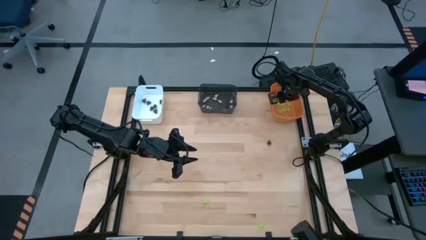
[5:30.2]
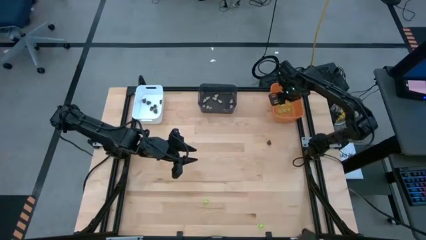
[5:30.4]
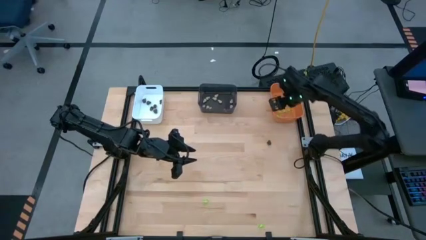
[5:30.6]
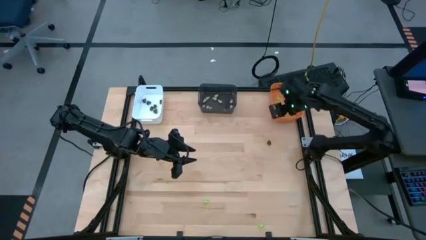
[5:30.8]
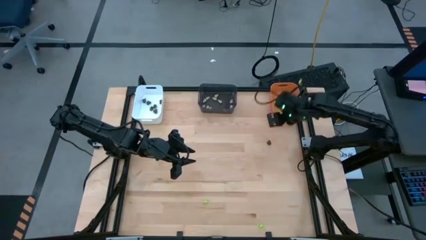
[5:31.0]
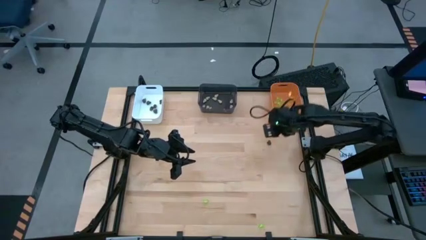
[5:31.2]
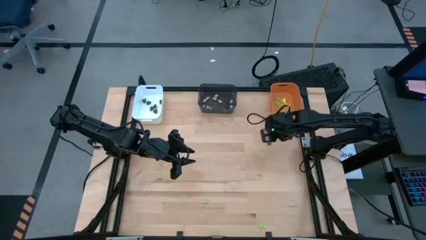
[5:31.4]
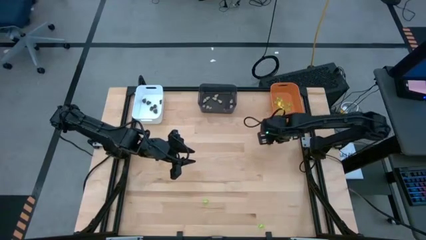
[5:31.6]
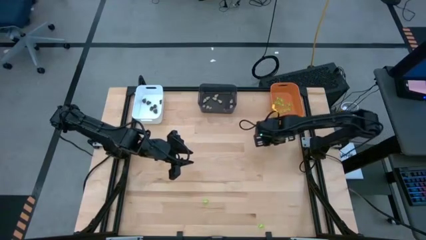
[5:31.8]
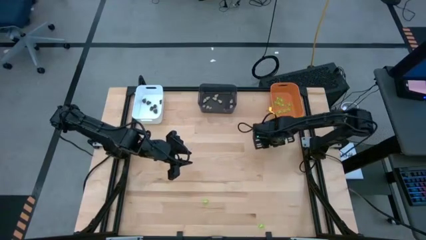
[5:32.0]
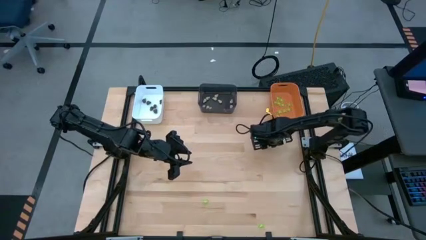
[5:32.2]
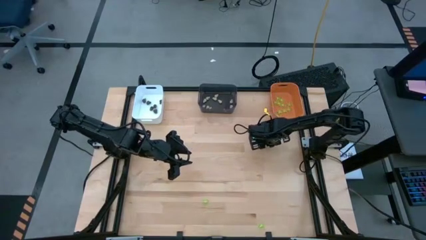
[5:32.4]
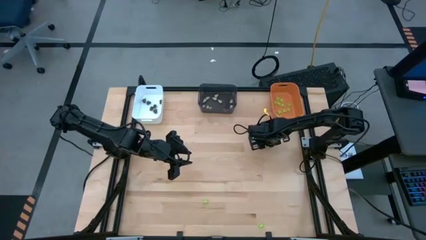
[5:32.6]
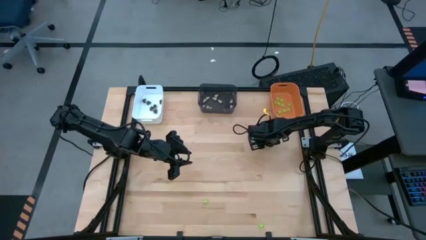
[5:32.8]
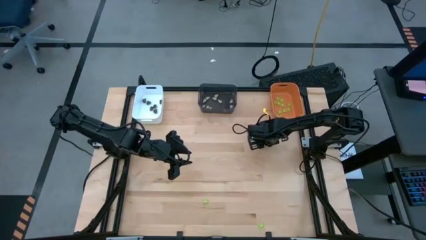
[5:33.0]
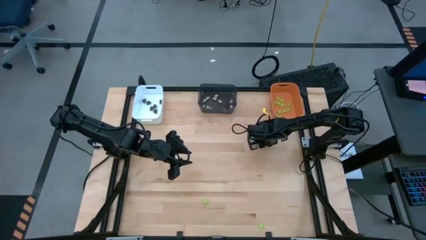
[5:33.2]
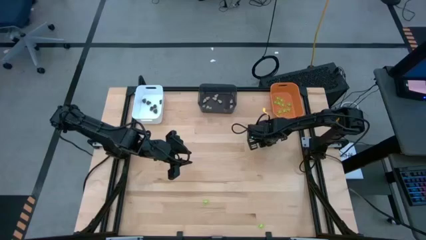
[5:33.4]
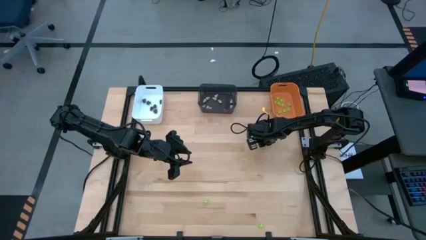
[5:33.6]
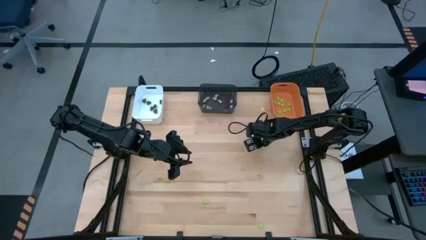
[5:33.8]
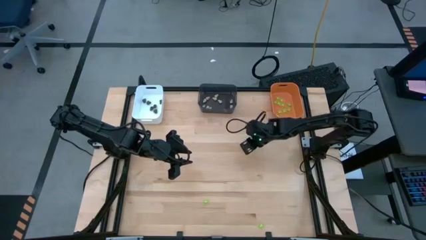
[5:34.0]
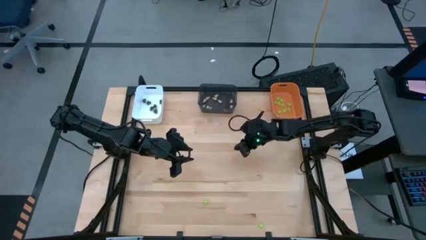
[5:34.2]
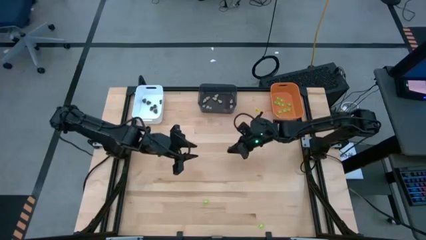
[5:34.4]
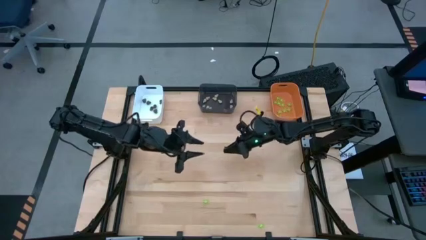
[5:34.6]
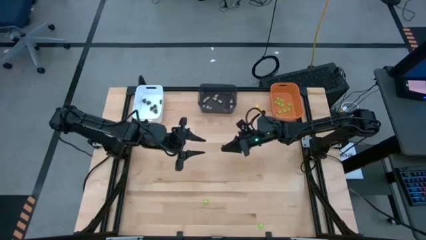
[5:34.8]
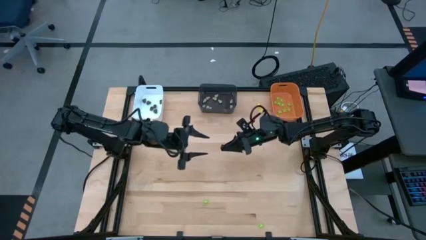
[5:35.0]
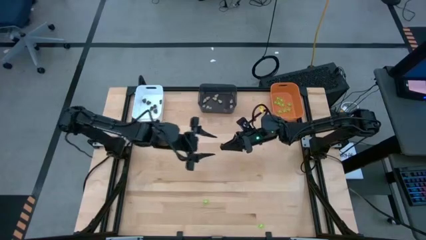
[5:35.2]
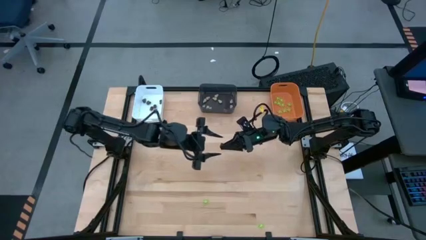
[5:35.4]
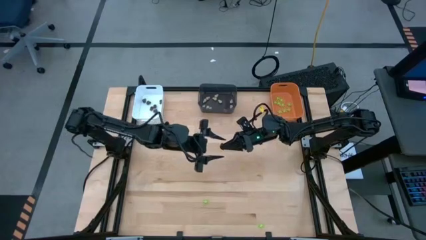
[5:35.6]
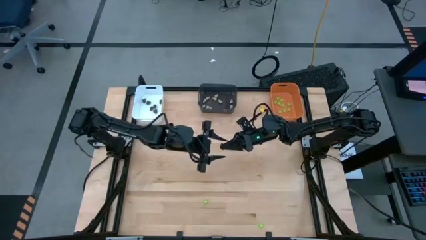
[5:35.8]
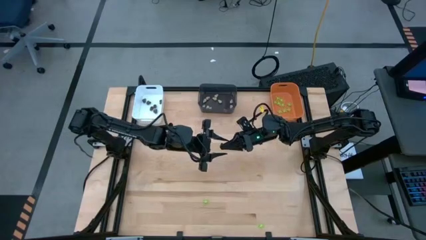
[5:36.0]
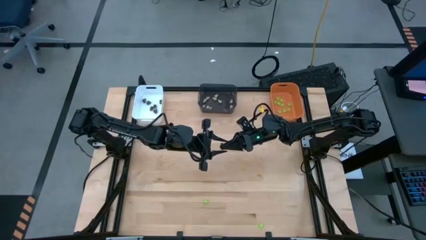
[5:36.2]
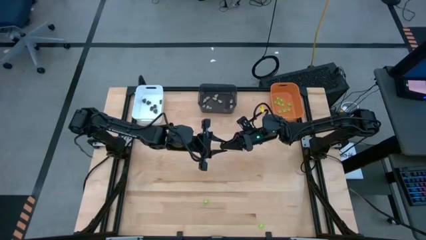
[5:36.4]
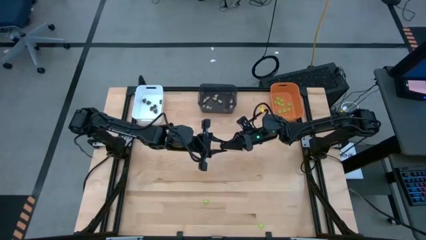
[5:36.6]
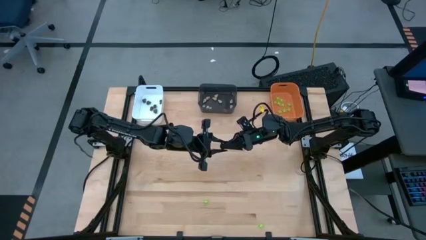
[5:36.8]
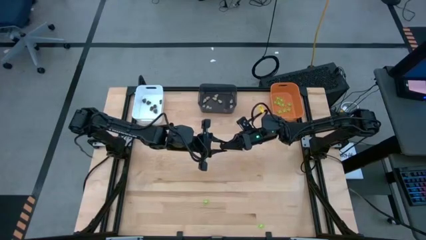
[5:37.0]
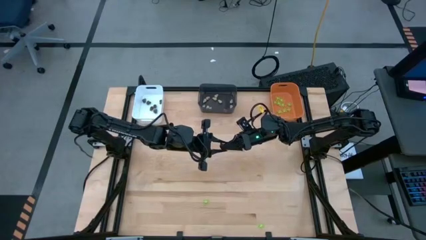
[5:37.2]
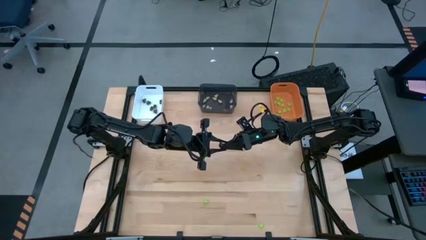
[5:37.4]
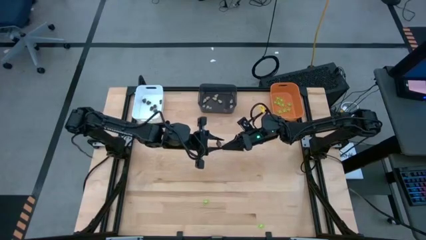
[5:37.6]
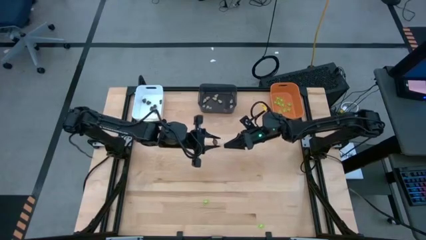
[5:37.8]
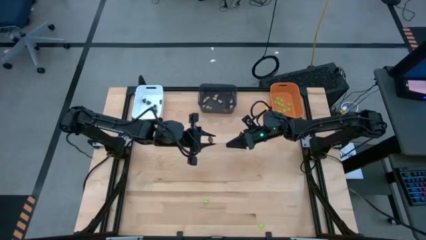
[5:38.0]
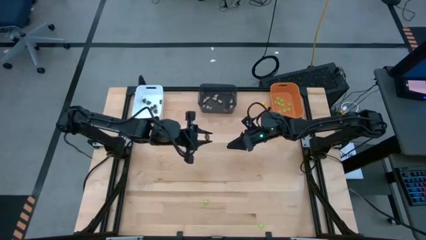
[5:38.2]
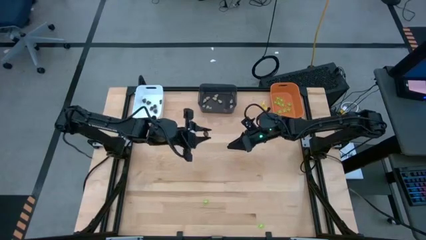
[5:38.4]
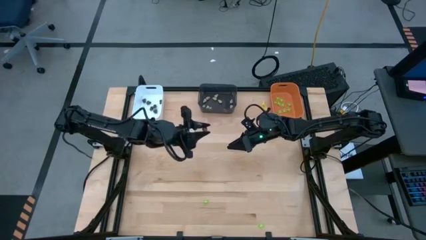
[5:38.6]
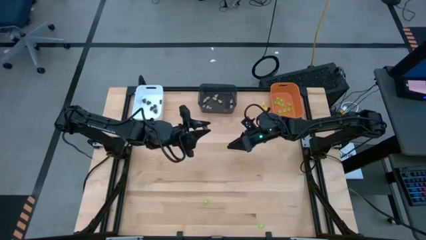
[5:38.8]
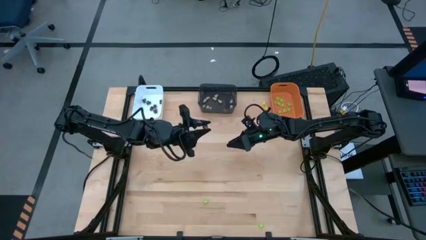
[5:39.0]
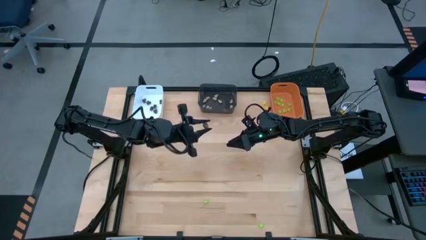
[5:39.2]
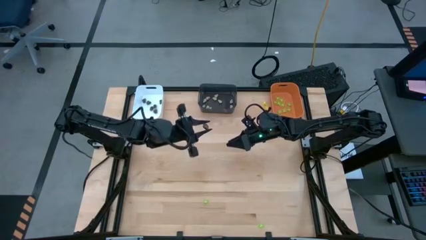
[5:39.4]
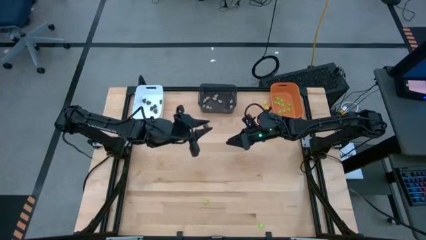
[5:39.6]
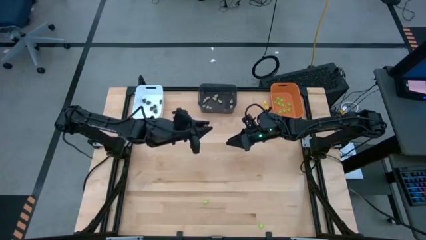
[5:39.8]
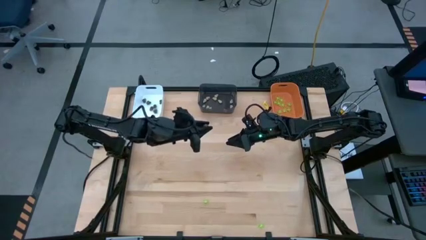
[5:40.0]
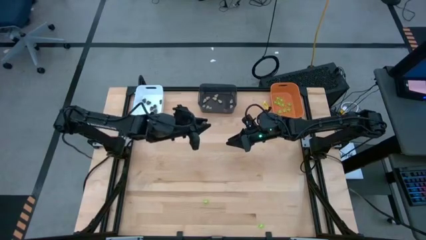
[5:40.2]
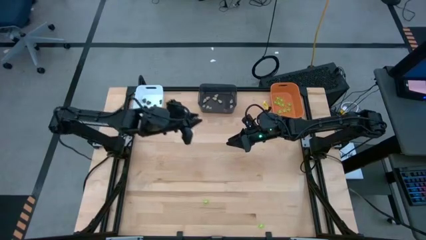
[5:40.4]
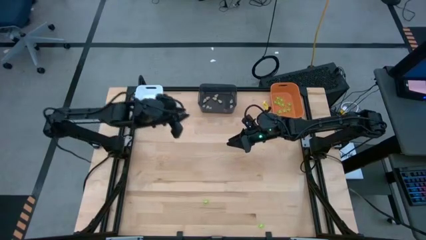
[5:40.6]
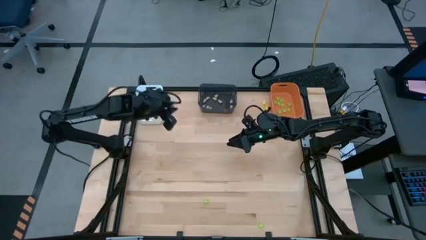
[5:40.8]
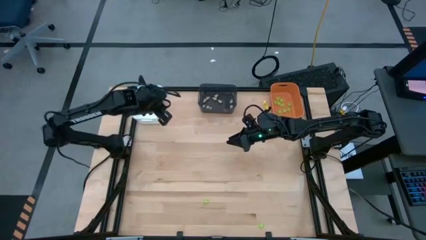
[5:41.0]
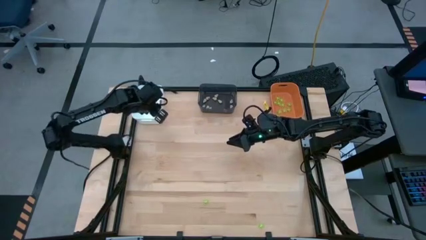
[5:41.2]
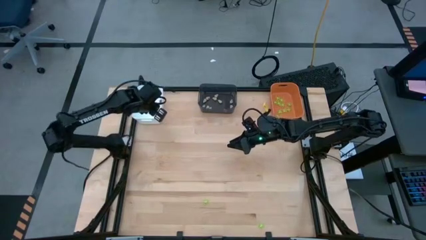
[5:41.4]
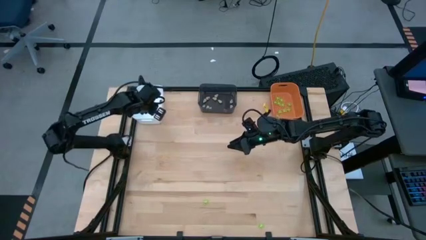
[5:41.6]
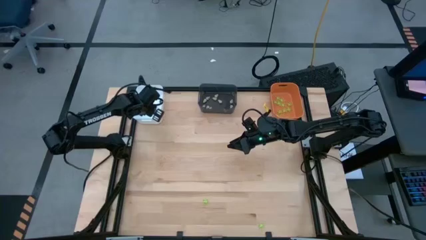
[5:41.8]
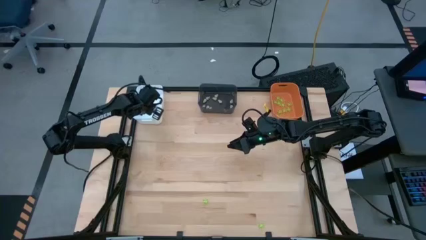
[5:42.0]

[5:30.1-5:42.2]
Task: Sort Halloween decoration
Put the black toy skull into the white bin

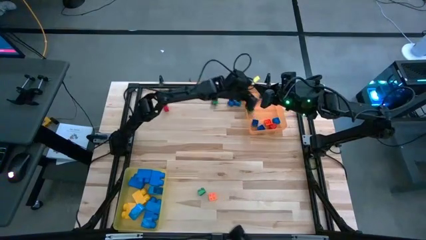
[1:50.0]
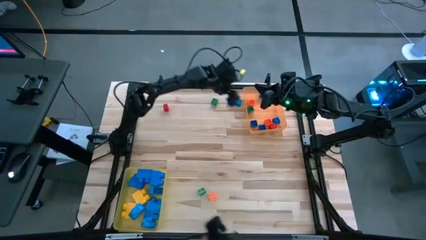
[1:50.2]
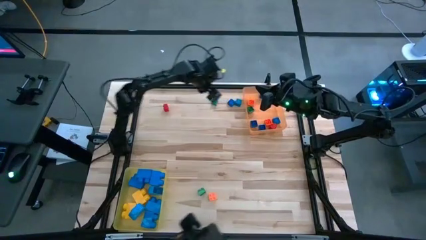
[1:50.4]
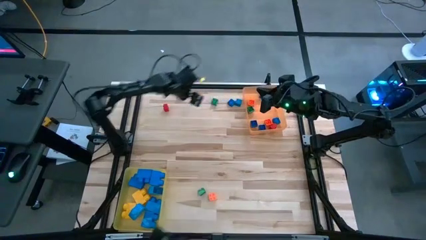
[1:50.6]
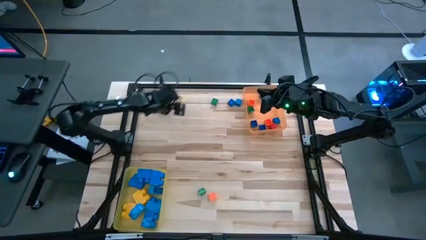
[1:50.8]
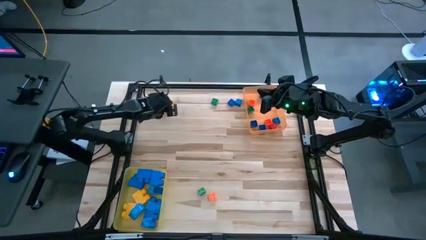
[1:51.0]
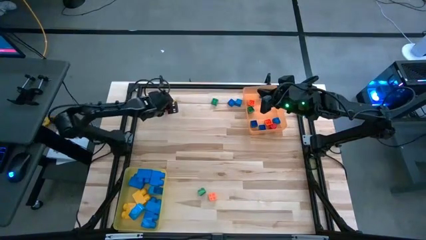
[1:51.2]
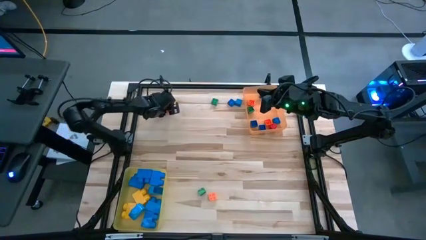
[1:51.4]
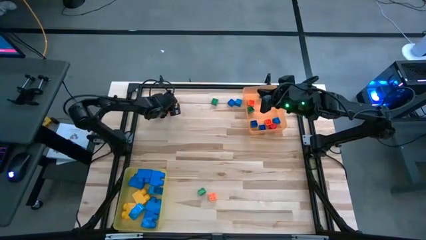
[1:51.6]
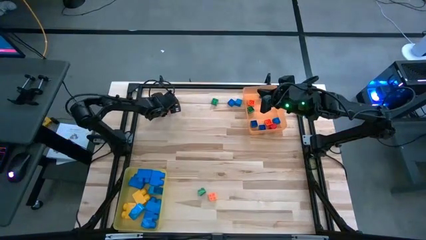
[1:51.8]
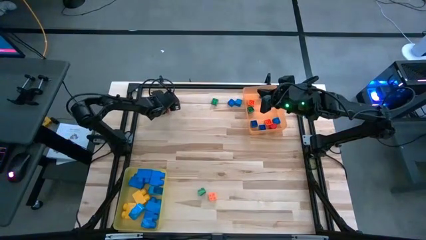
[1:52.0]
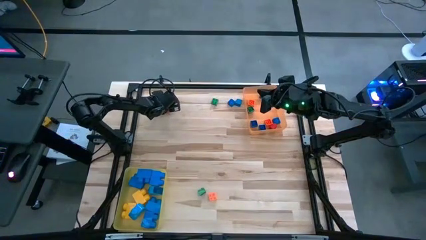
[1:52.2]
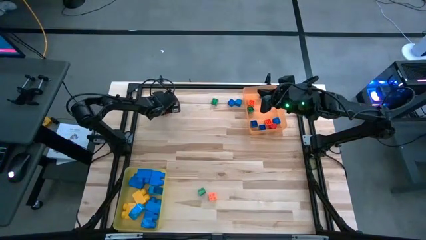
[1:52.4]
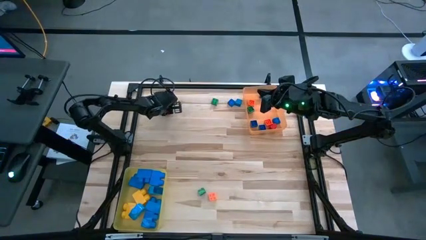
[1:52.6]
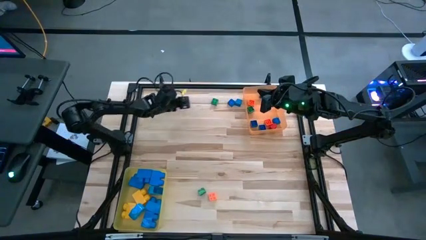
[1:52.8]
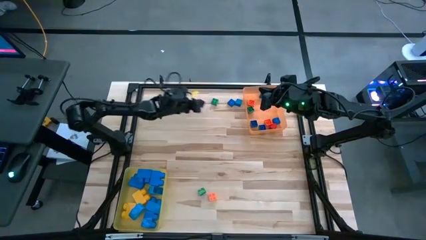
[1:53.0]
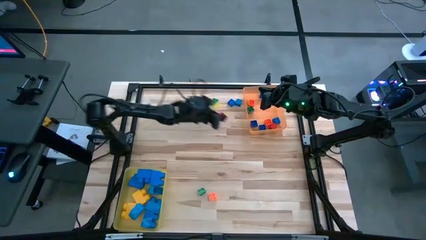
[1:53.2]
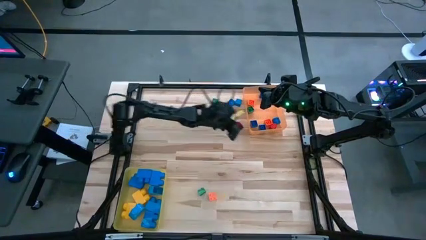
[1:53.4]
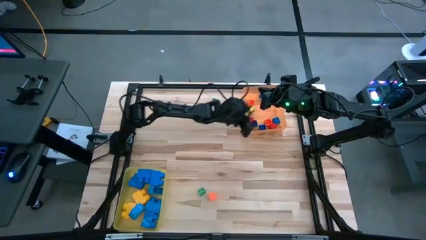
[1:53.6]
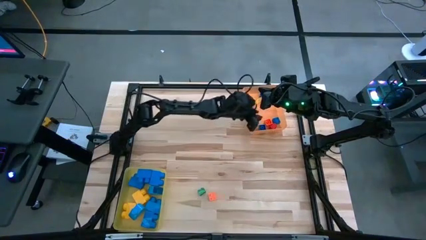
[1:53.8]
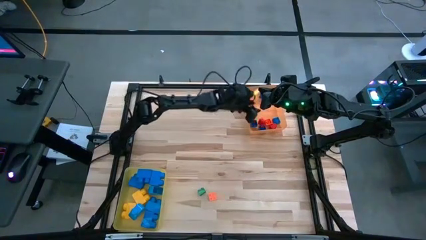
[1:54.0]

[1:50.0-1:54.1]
Task: Sort blocks by size
Put the small red game piece into the orange bin
